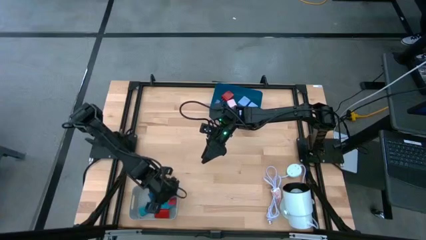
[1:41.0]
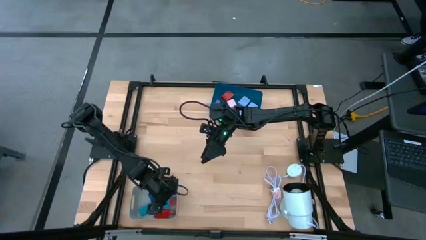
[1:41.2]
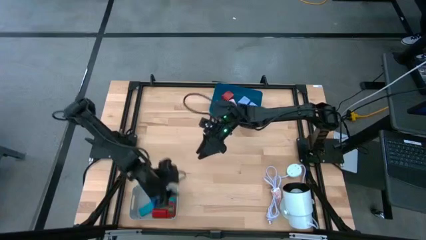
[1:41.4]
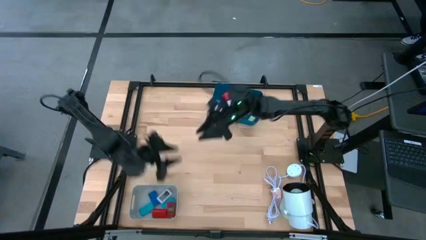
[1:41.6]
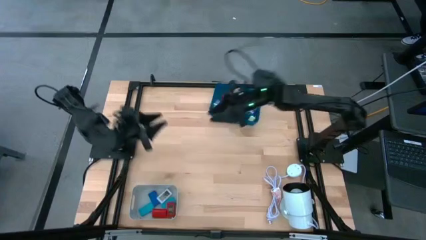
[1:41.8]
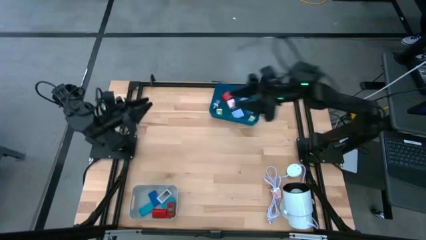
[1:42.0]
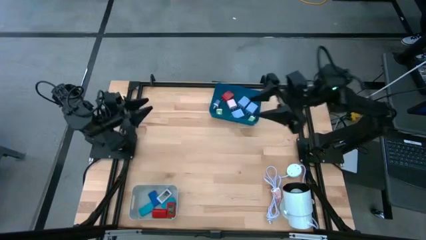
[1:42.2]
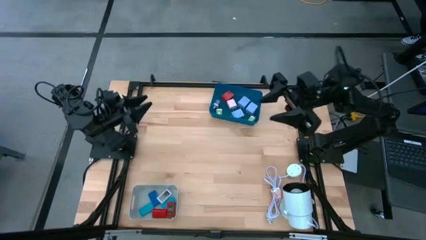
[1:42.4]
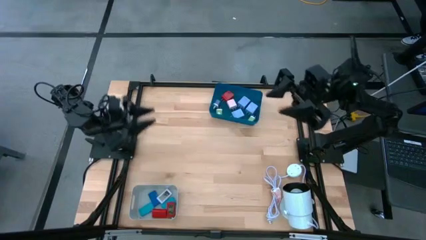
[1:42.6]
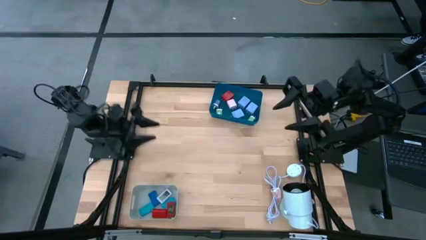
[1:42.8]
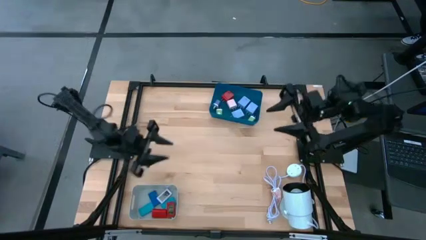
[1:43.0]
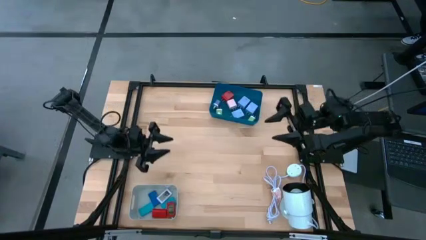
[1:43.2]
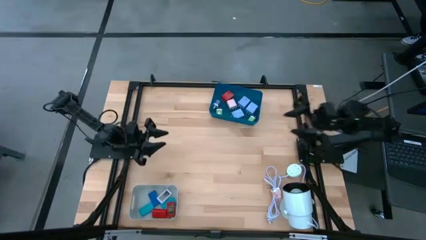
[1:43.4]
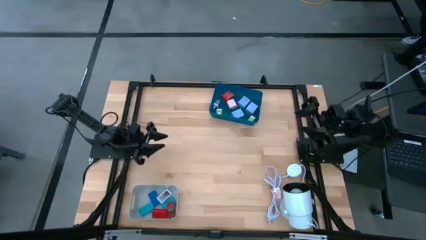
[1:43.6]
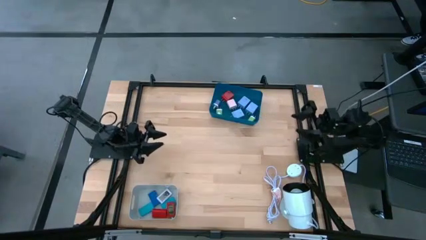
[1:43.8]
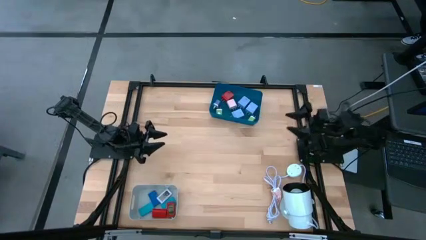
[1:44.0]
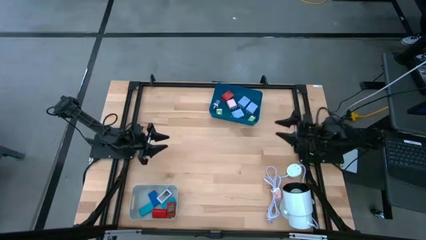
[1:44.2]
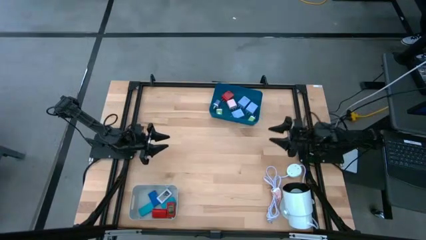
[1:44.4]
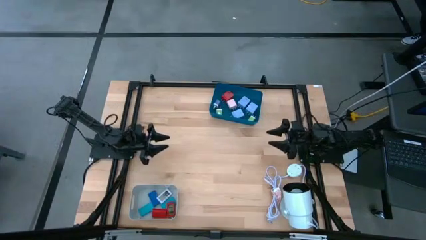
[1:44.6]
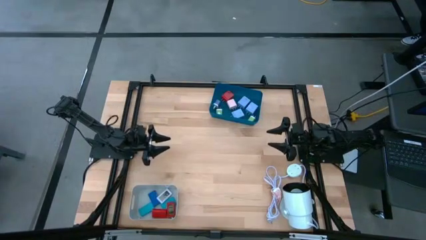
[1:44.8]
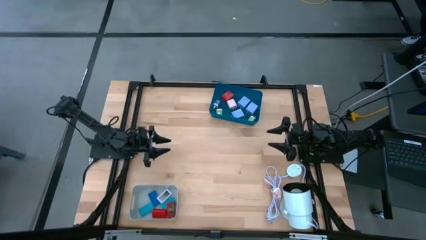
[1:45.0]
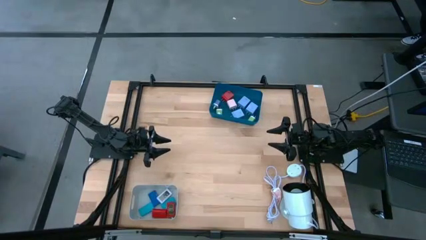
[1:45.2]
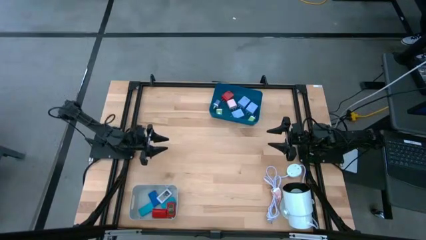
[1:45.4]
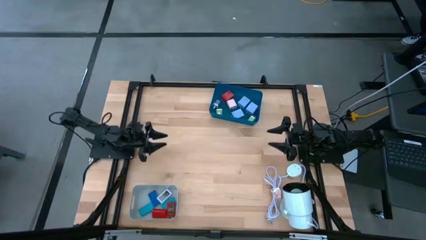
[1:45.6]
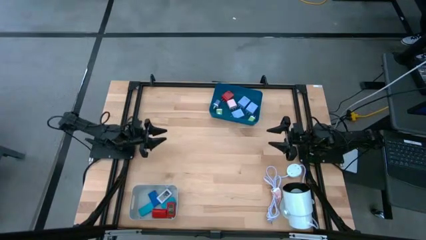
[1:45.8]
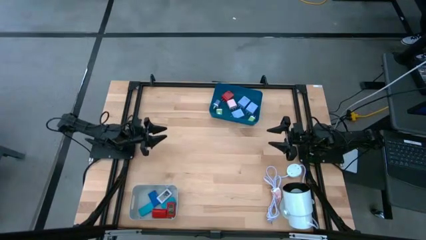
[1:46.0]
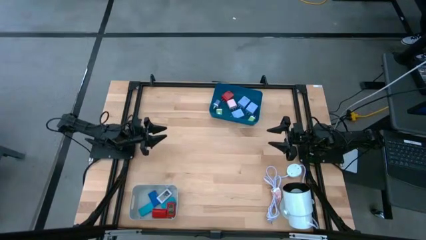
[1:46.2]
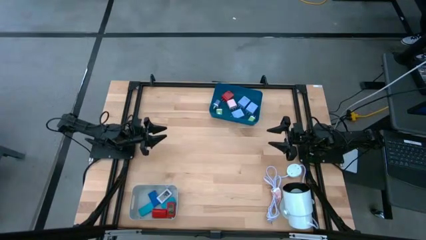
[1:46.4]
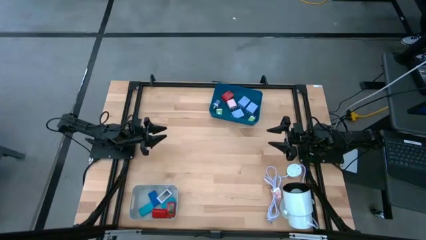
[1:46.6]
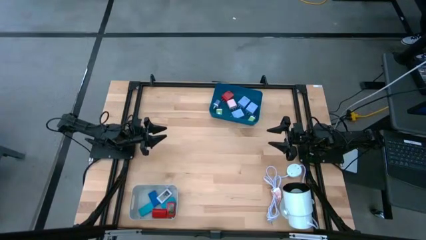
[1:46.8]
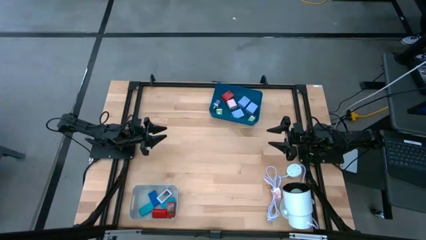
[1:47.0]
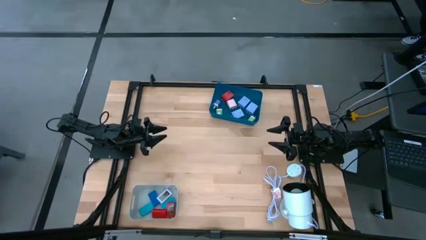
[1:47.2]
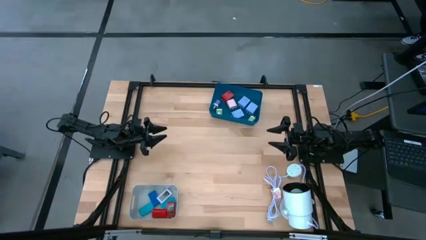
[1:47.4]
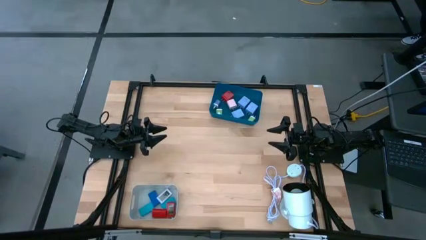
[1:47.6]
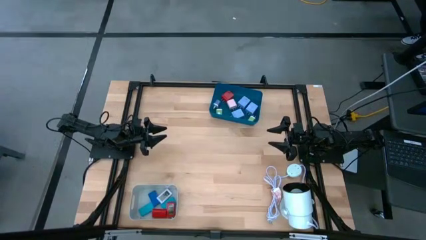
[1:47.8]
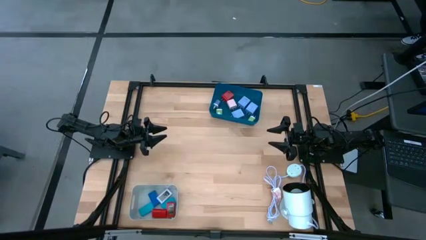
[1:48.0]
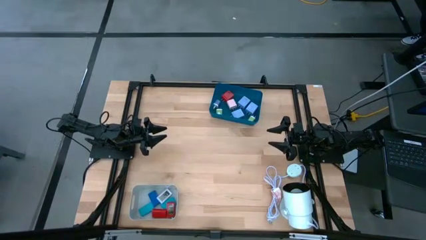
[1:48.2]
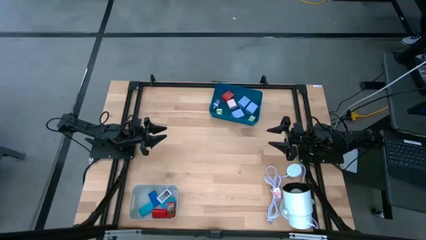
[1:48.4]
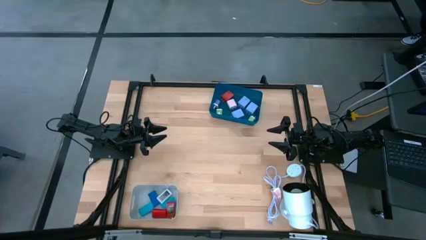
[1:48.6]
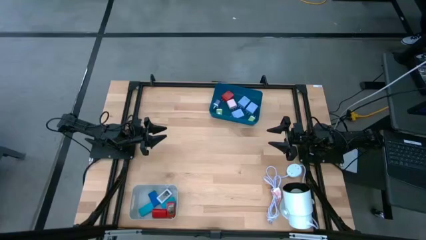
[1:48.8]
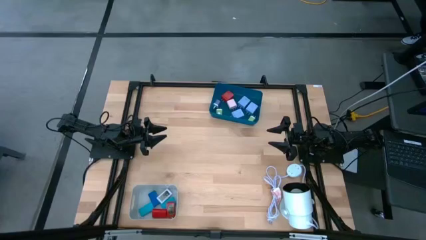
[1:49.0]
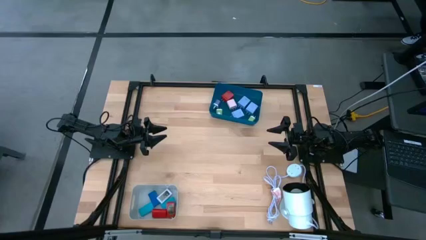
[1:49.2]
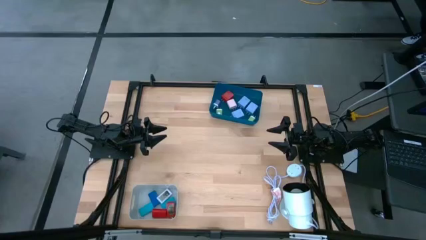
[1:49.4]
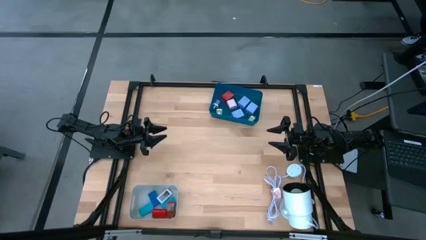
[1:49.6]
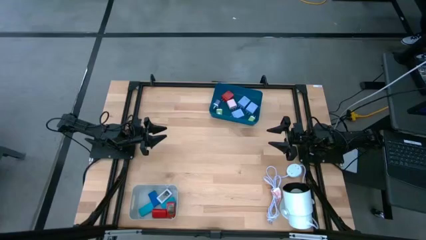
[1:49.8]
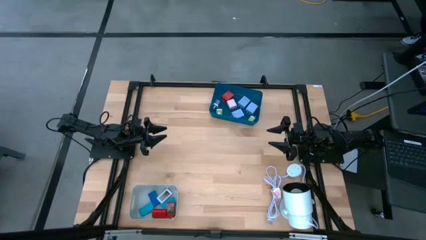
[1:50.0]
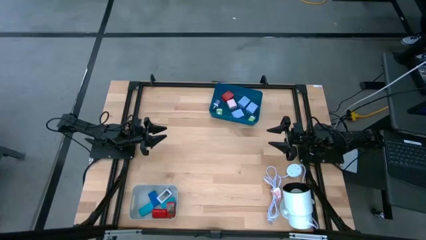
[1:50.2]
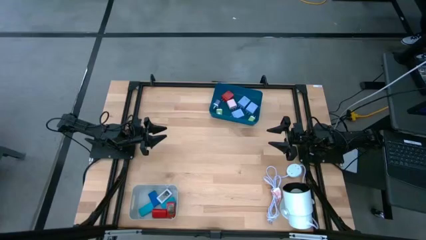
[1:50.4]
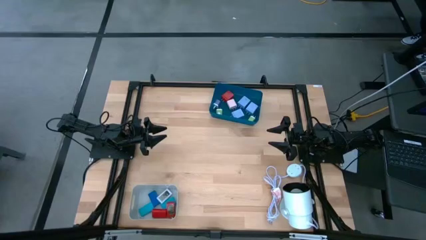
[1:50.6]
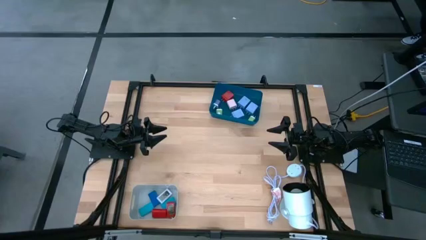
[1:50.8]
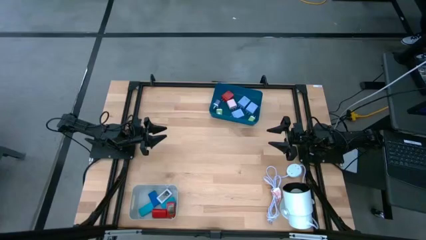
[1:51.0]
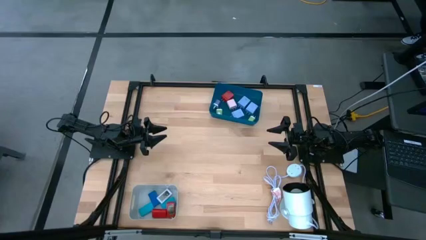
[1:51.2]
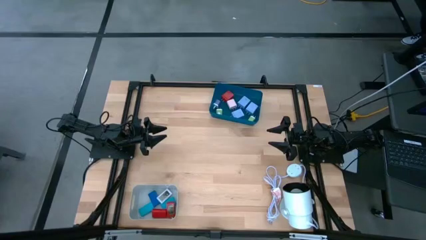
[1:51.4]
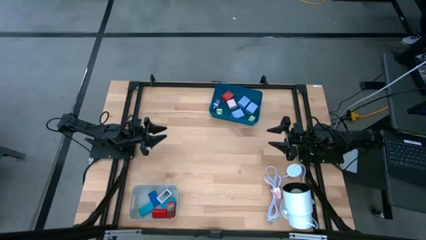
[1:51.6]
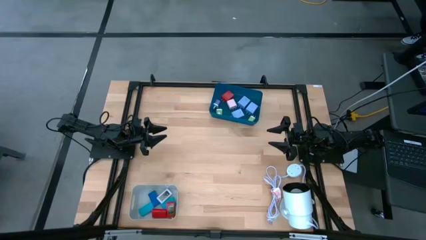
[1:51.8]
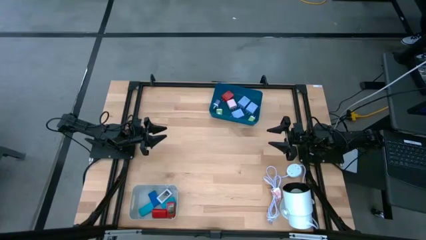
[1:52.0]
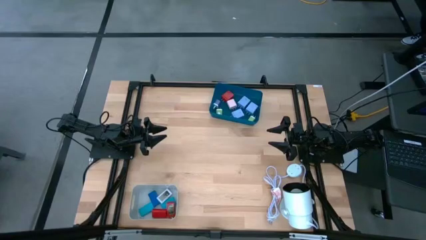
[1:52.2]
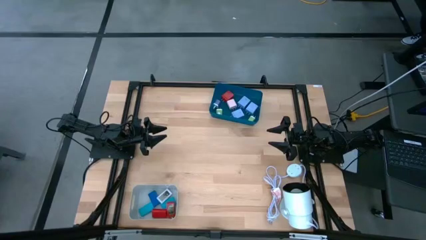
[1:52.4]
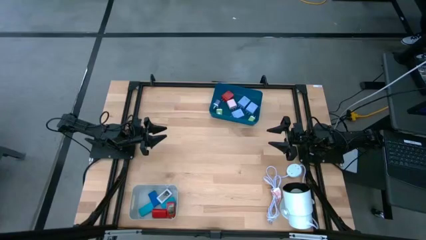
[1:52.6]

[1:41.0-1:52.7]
Task: Pick & Place Office items
Return to Home Position

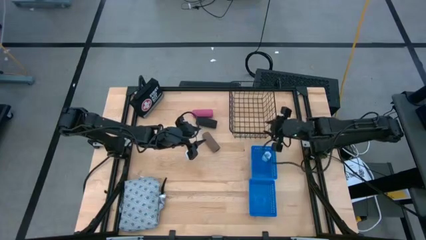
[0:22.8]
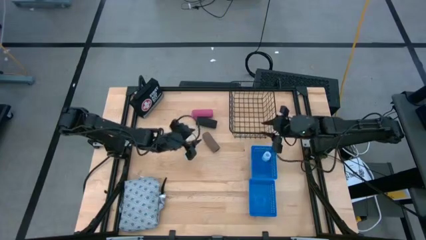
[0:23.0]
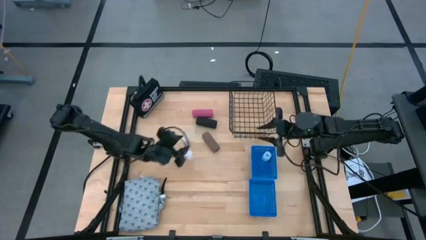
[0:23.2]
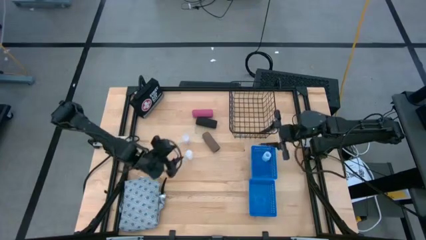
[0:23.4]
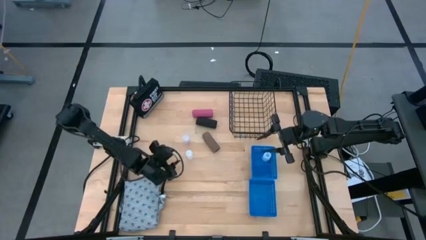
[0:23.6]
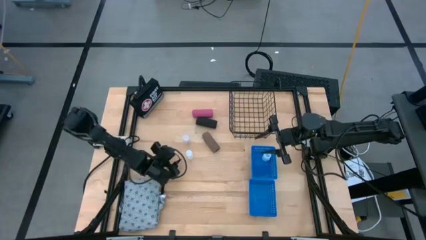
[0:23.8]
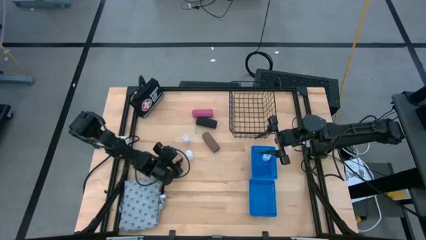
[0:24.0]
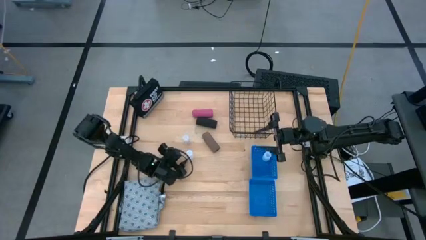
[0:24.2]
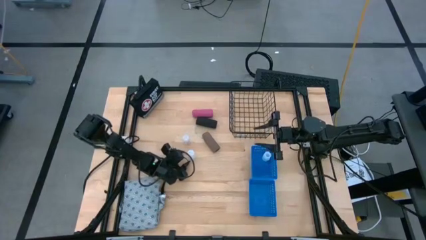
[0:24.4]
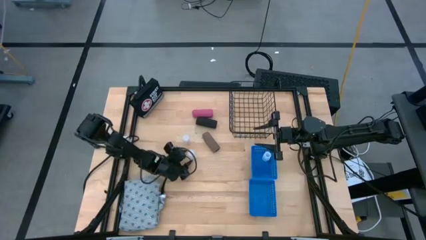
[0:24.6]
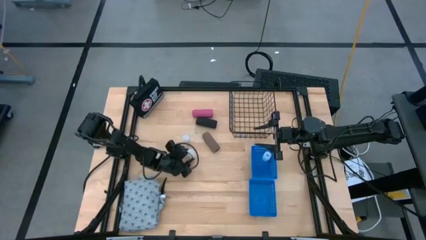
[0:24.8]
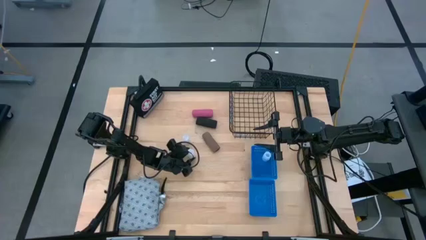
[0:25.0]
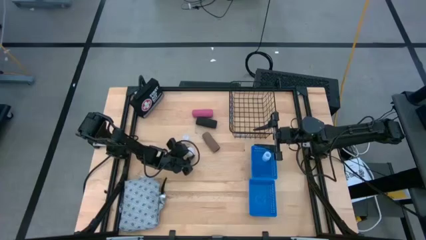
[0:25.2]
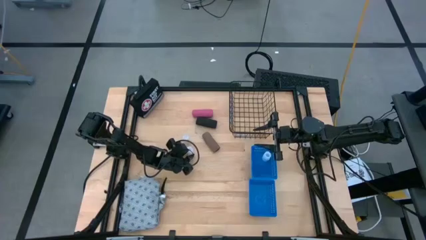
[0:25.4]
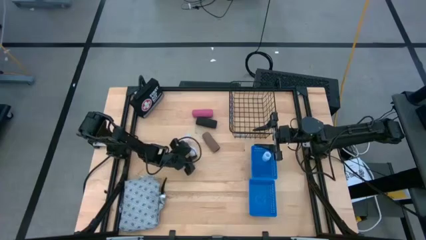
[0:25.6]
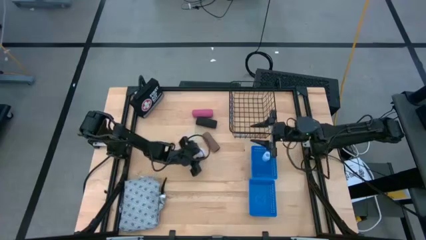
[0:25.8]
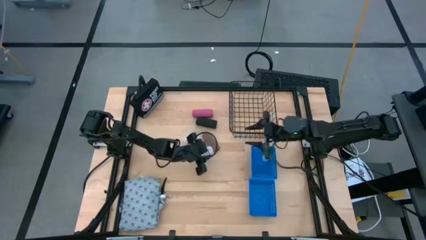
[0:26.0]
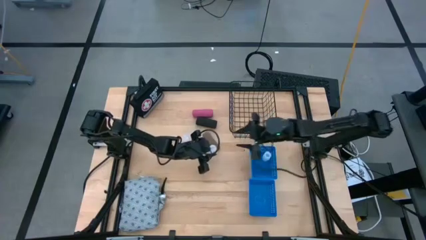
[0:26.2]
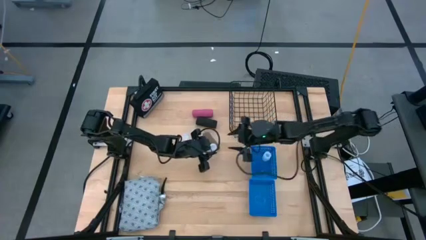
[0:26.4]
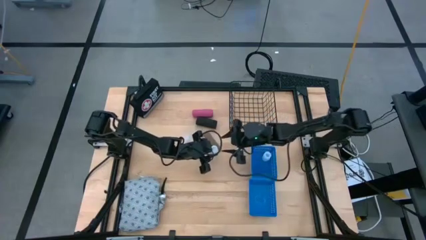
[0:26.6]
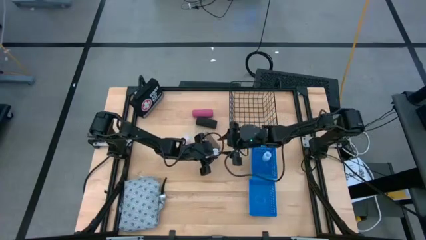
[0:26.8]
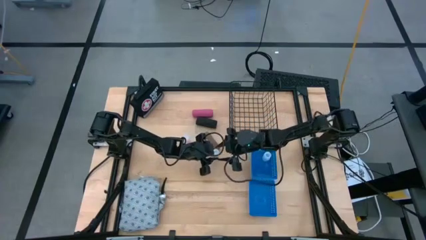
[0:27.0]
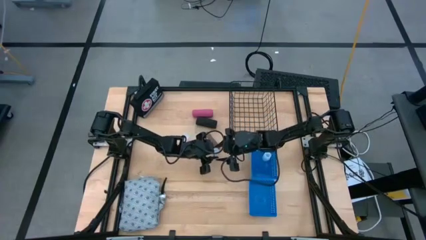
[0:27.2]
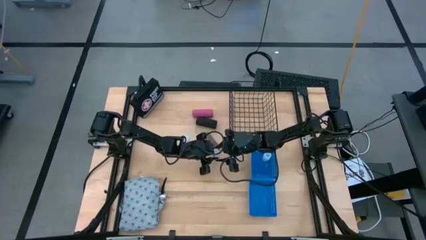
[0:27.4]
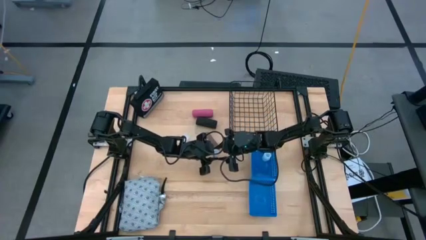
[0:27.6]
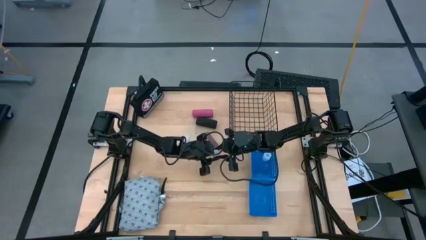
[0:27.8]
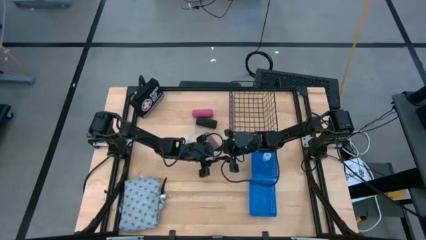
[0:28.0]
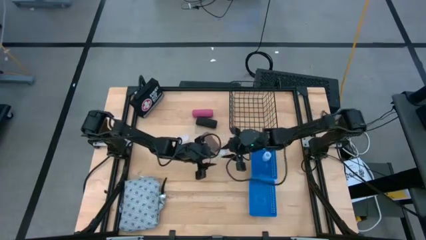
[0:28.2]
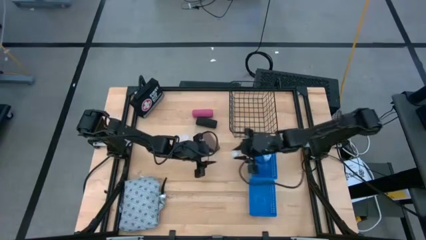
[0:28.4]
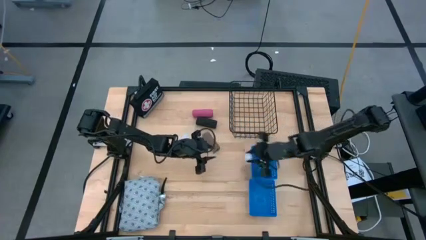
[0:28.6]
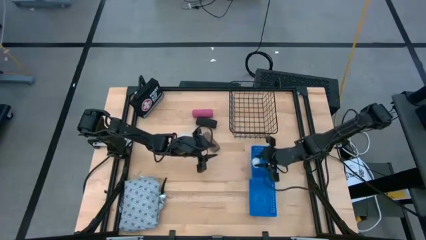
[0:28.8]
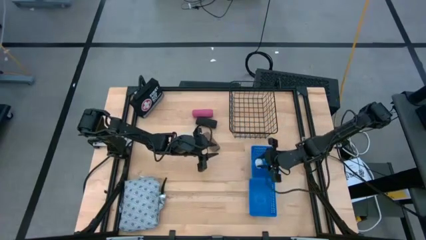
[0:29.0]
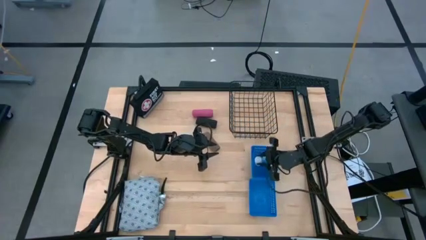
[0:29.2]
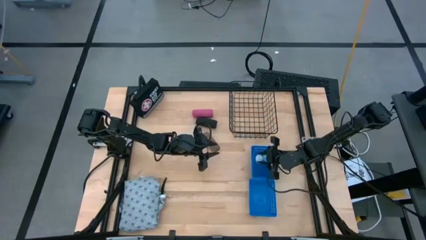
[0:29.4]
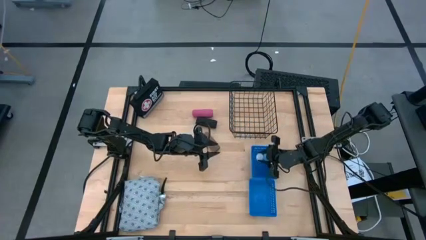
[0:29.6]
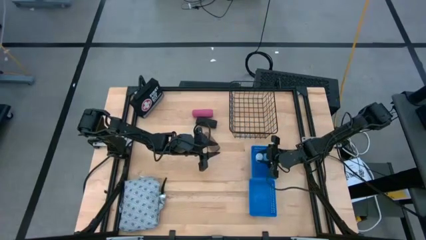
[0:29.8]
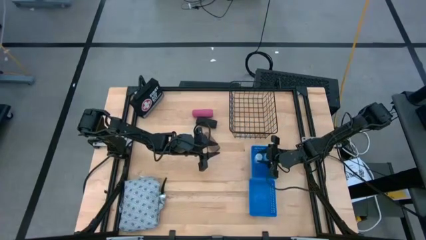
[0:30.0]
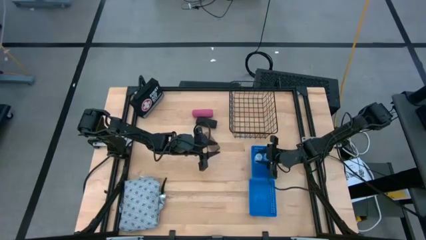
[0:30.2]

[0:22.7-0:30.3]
Task: Pick & Place Medicine items
Put the bottom transparent pill bottle into the top blue basket
